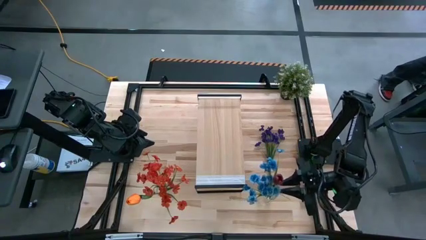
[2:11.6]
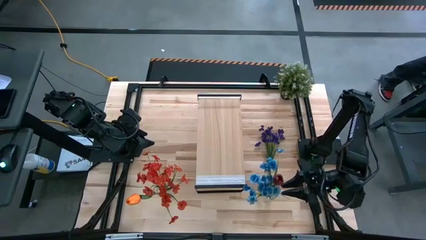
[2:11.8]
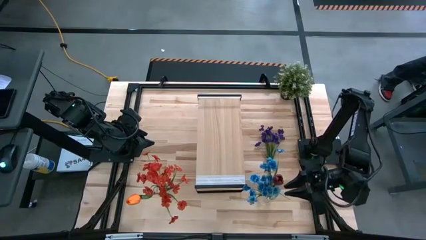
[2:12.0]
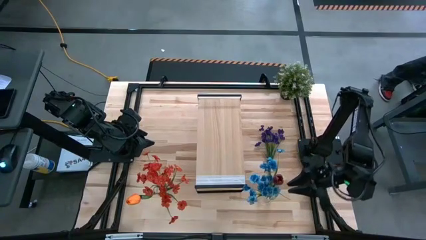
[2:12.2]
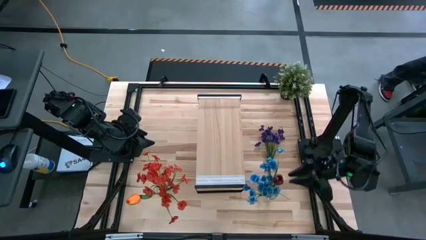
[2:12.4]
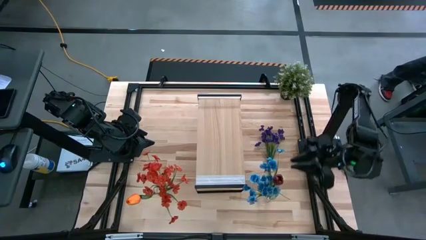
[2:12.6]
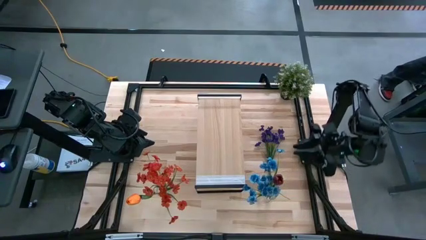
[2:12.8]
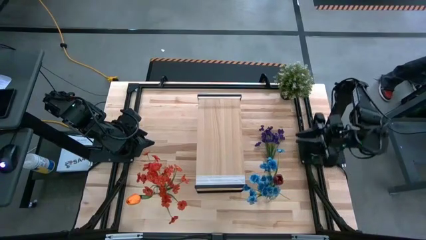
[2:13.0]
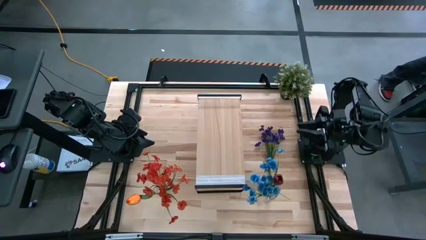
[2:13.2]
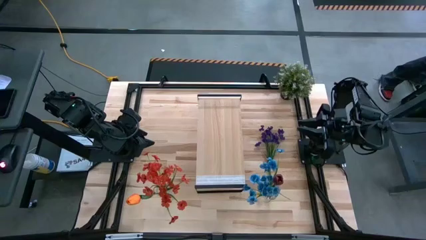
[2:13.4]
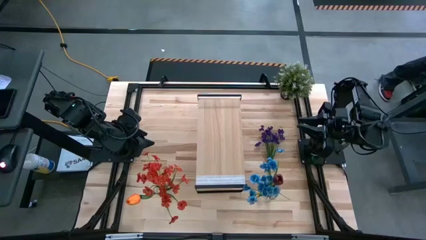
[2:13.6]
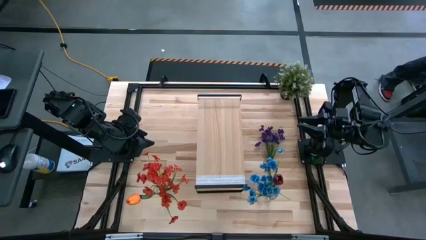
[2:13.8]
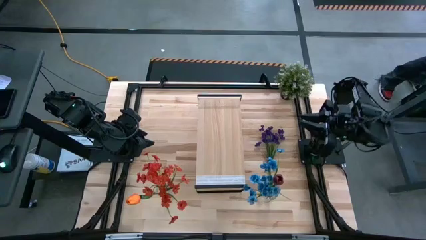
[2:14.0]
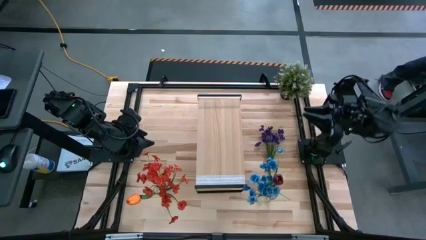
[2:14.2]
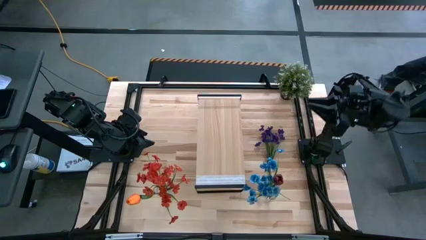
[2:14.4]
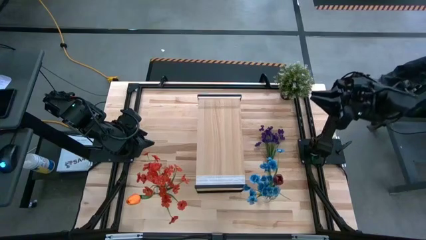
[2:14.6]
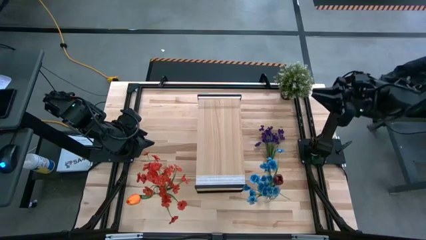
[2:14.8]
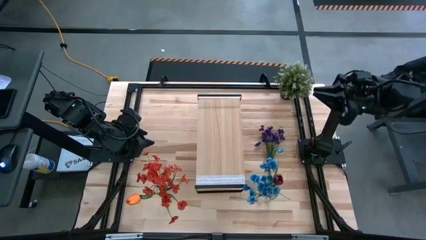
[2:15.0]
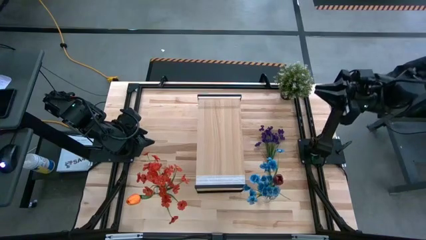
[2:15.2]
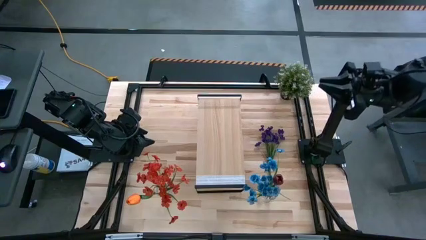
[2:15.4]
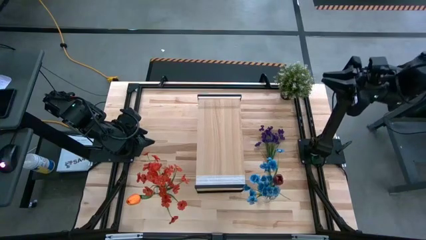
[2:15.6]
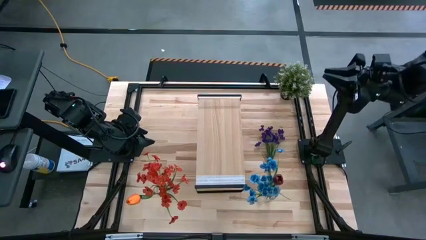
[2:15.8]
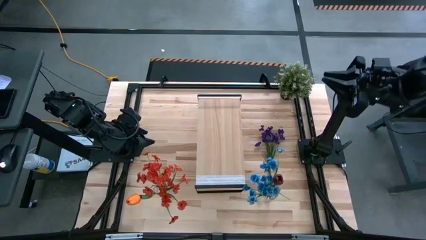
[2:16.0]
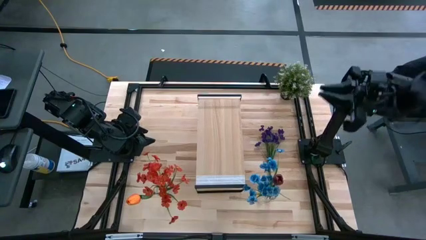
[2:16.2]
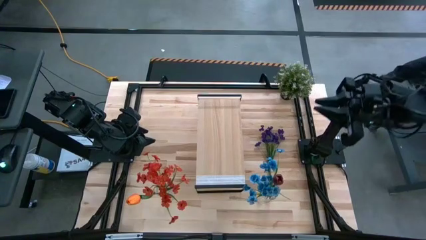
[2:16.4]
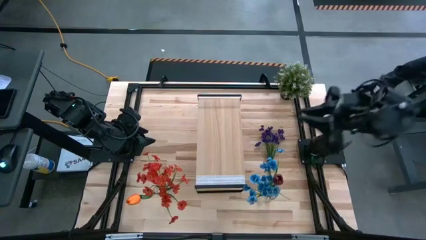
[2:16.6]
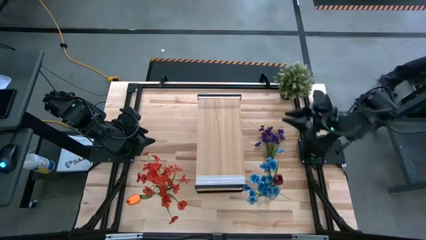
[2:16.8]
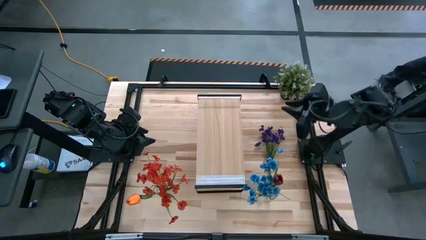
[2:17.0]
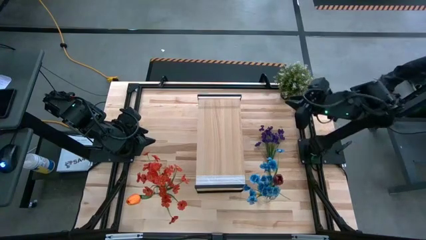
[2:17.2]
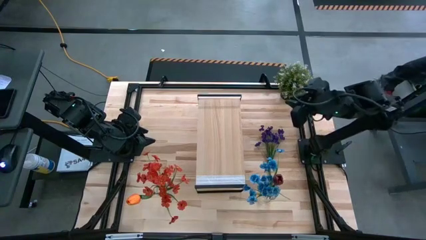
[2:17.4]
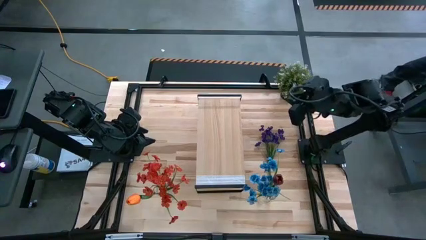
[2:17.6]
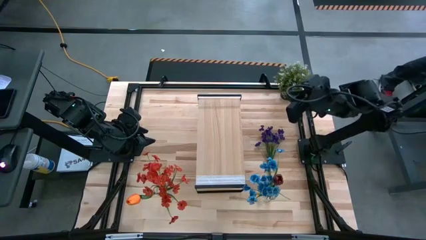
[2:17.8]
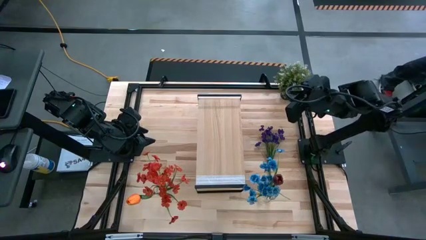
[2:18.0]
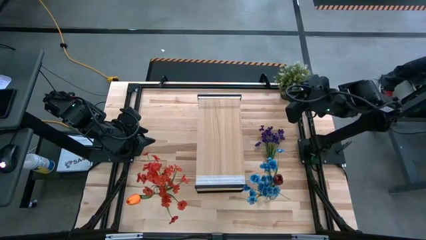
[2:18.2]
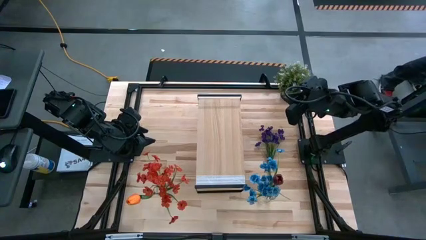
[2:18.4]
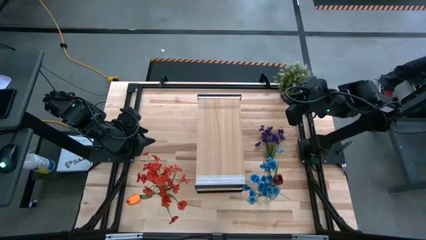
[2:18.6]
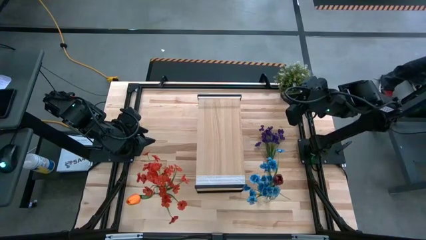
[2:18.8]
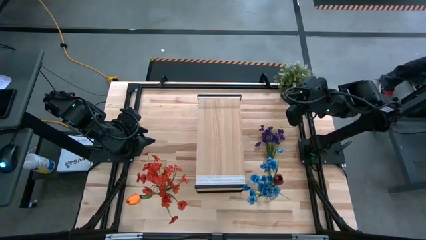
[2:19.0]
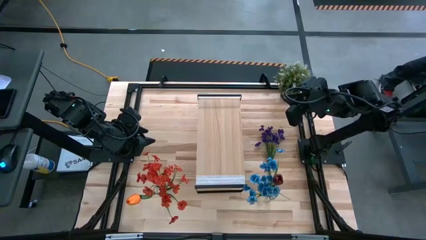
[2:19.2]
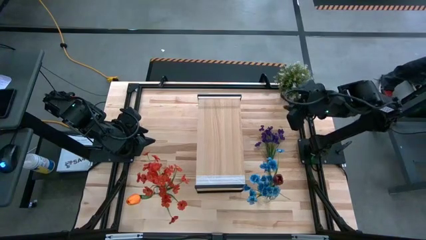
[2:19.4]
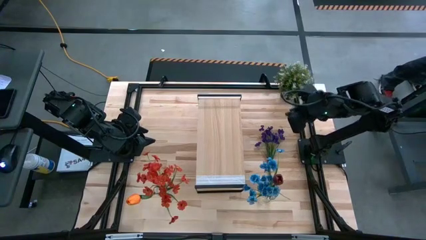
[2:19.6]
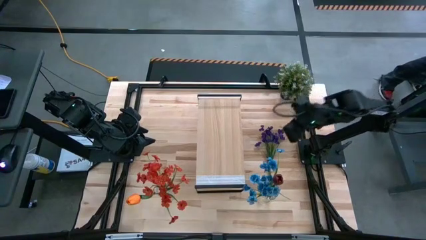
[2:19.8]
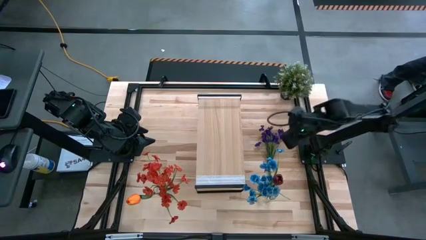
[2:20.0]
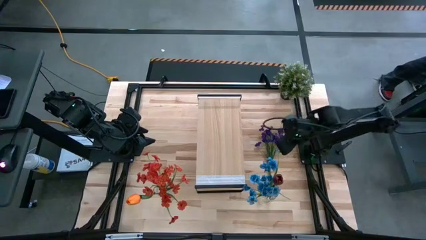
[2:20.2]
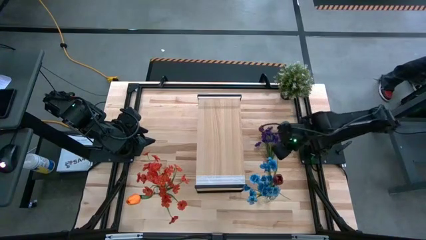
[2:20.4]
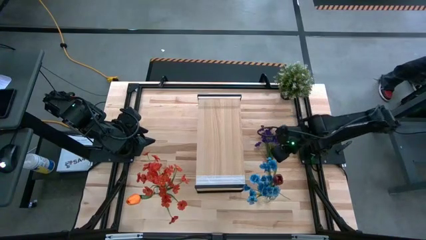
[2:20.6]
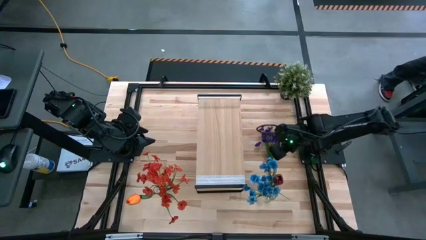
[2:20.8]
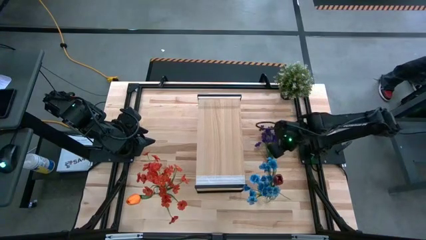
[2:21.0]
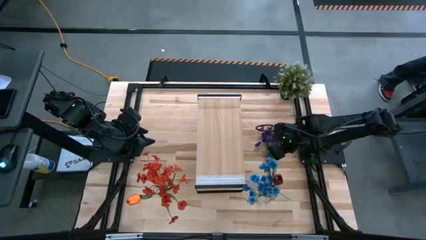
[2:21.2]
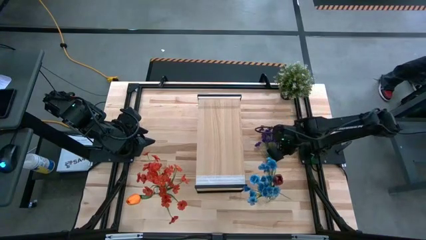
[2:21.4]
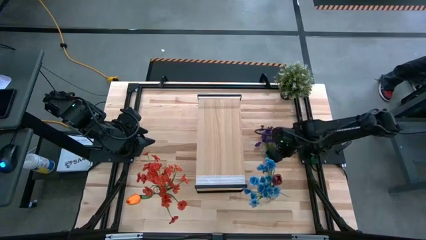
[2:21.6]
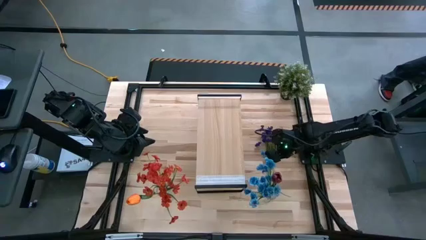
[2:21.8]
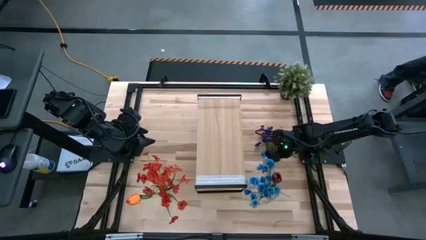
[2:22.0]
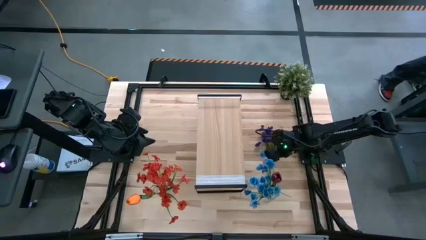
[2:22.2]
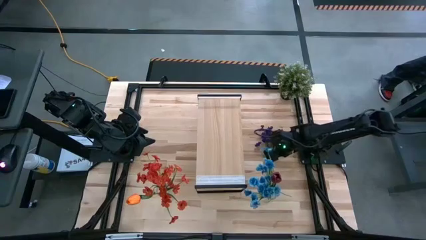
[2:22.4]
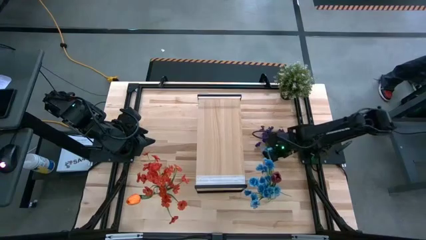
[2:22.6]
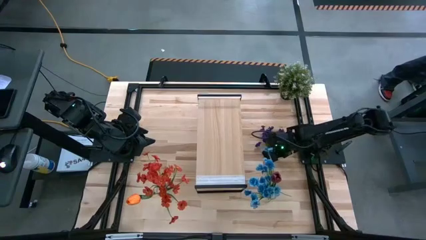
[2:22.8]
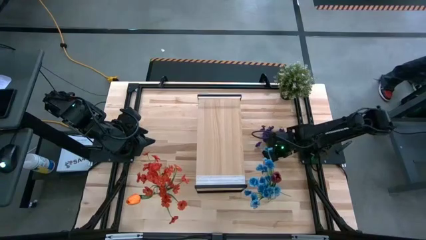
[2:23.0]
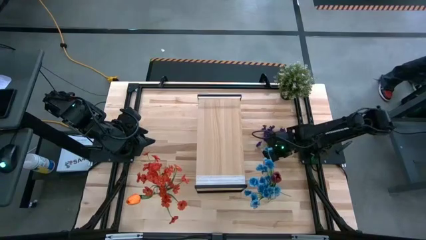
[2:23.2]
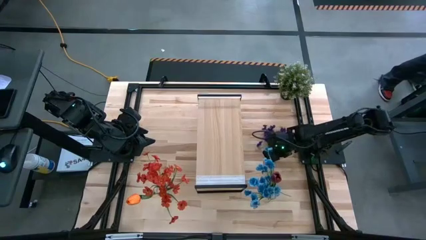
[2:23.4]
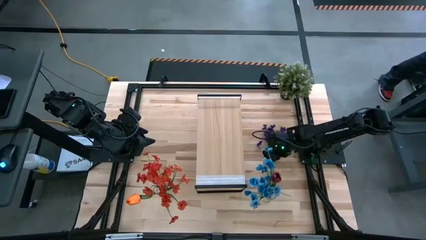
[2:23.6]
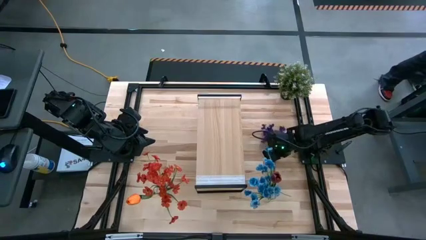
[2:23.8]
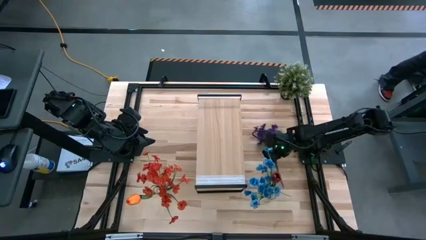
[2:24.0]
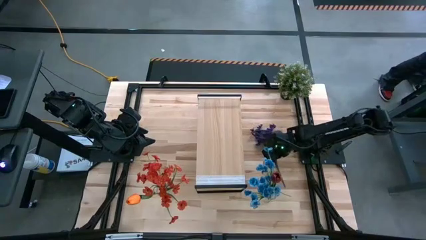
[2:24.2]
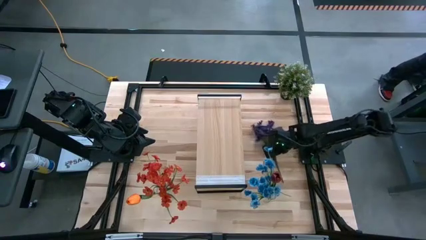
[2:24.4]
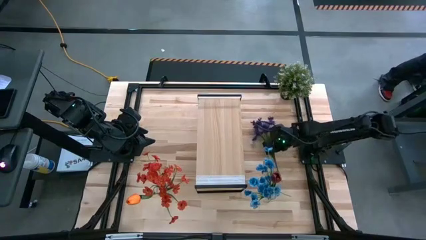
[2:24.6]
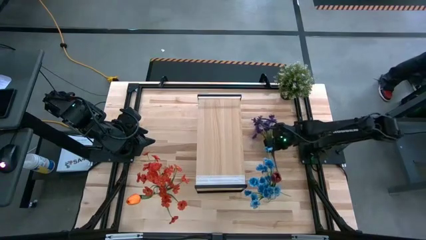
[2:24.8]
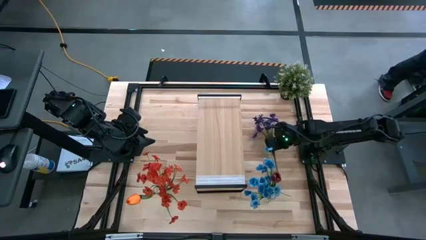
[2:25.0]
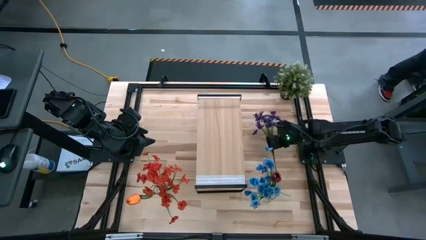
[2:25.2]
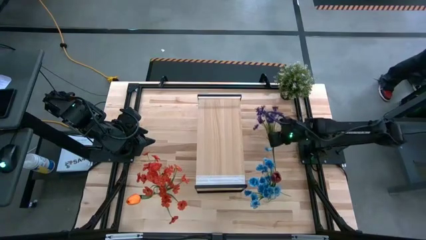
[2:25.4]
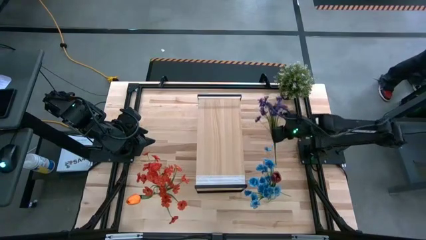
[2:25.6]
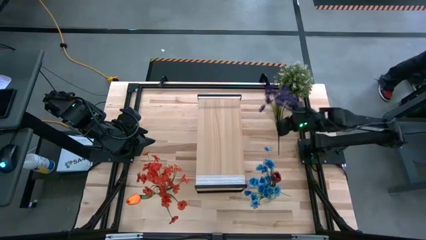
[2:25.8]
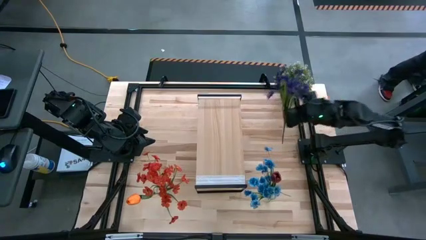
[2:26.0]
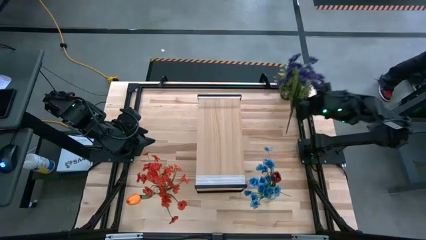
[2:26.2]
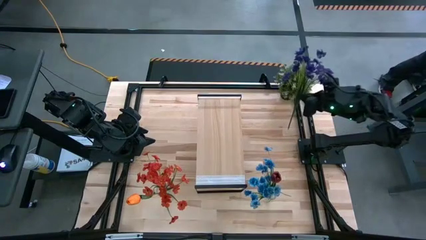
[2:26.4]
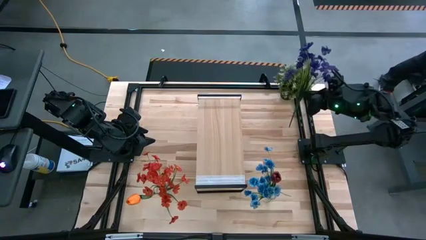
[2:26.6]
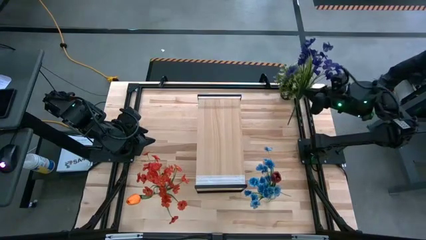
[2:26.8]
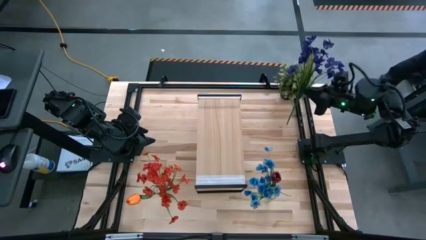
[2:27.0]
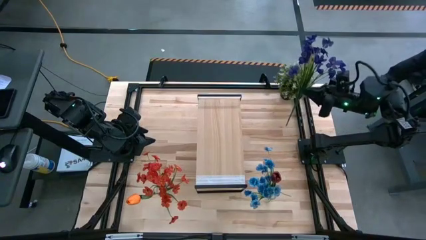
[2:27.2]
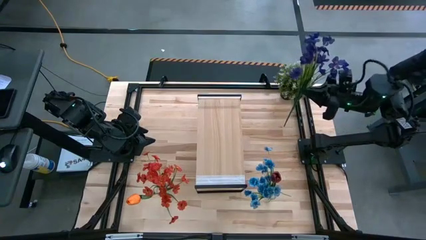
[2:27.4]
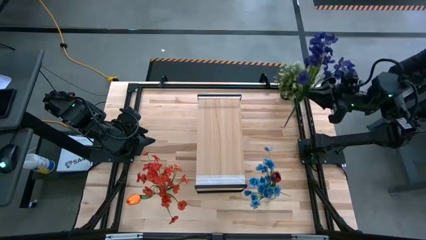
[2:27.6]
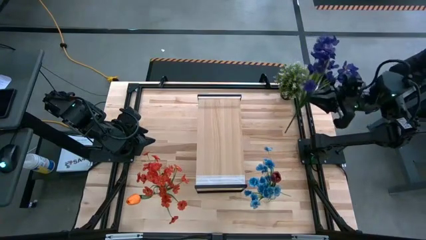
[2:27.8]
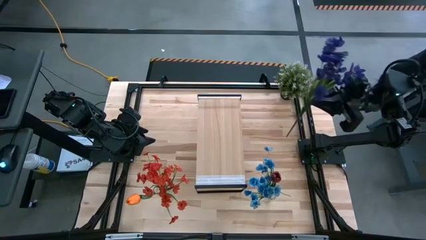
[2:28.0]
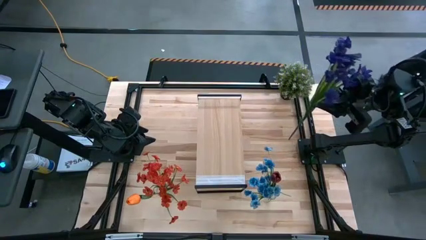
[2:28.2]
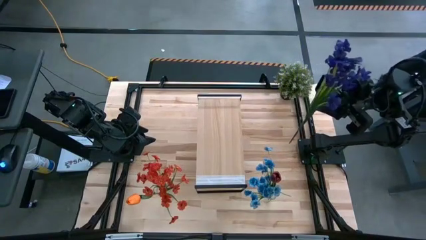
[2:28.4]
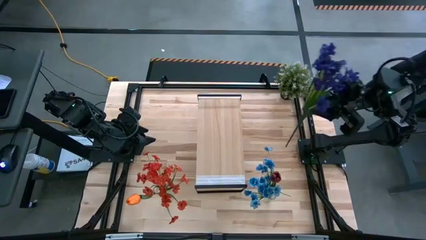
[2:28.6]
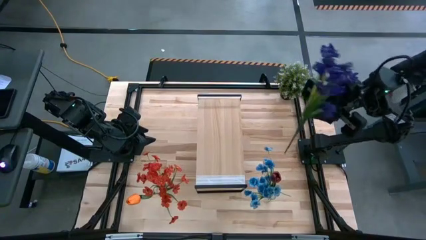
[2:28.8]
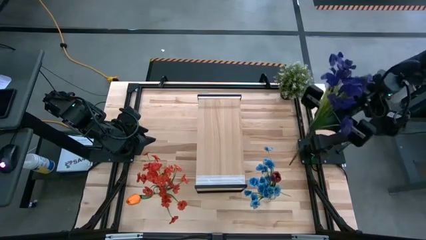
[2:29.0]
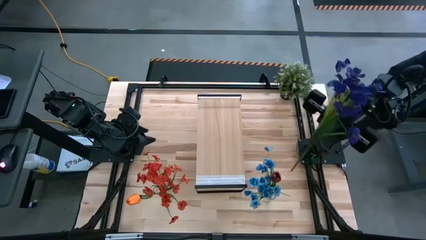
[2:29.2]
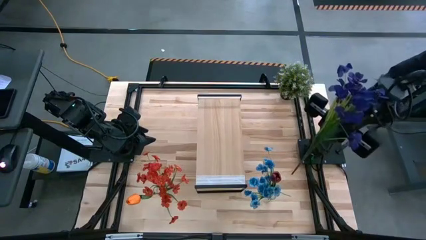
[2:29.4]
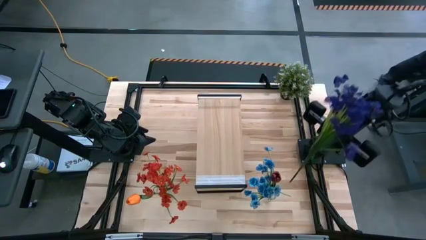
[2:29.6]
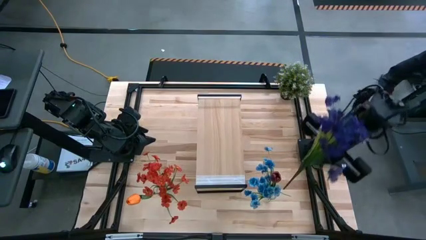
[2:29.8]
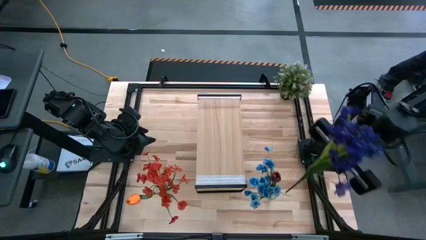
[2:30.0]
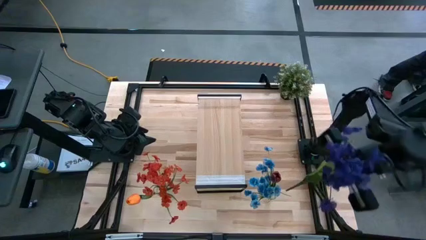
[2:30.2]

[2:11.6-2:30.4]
Task: Pick and place flowers into a vace then onto a shelf
Put the violet flowers into the right transparent vase
